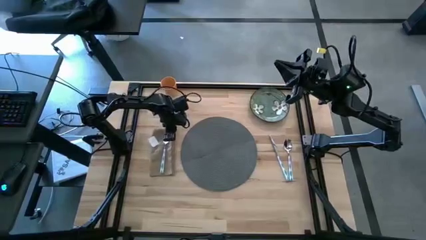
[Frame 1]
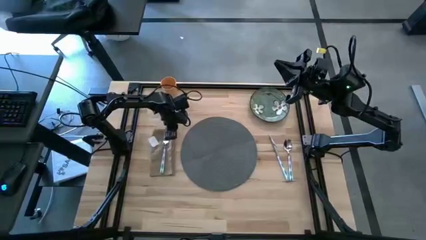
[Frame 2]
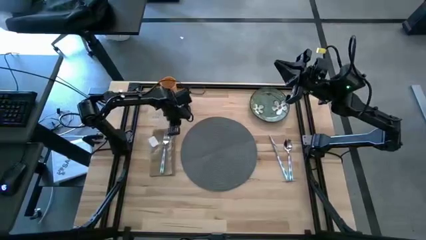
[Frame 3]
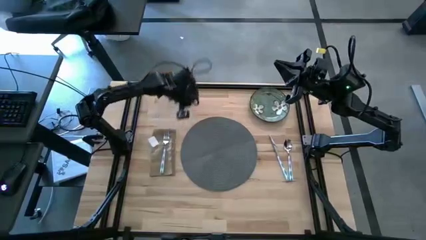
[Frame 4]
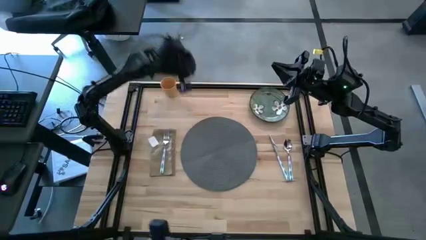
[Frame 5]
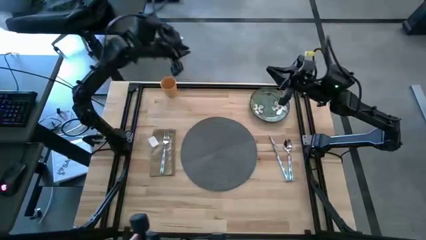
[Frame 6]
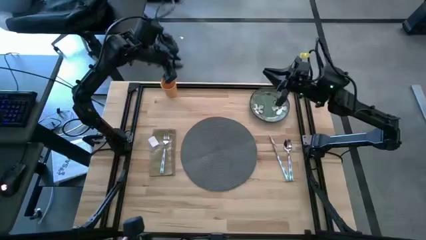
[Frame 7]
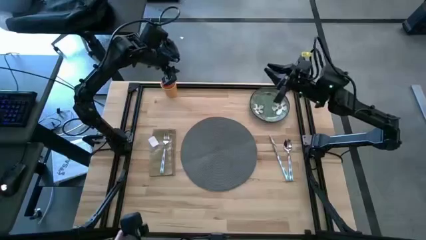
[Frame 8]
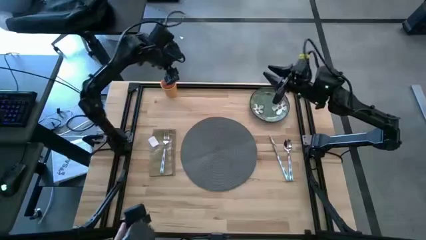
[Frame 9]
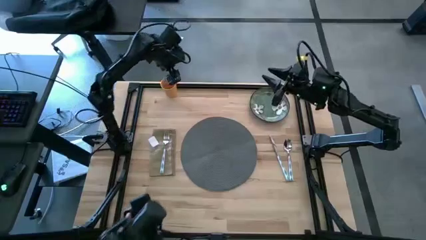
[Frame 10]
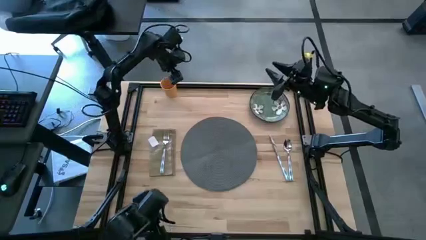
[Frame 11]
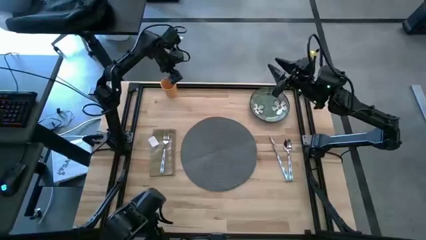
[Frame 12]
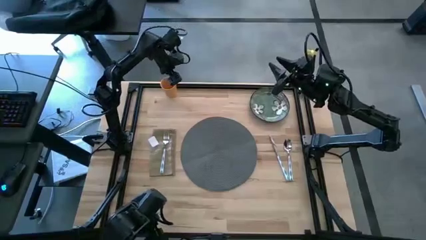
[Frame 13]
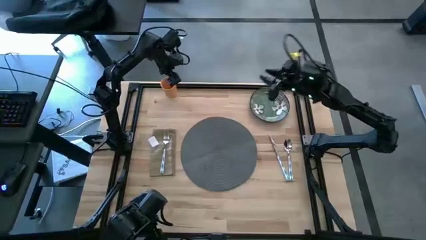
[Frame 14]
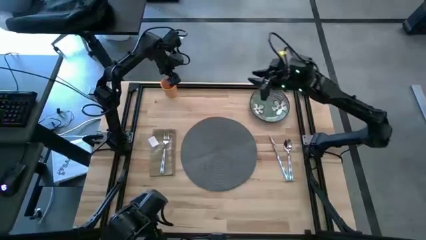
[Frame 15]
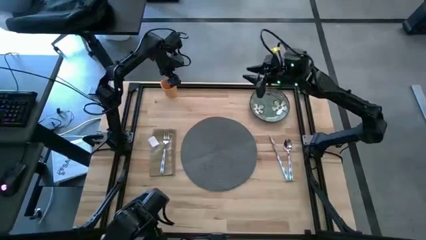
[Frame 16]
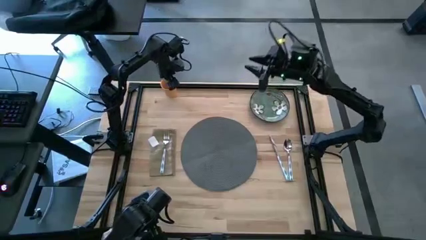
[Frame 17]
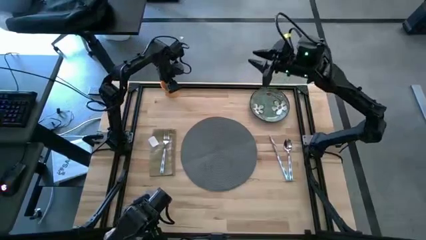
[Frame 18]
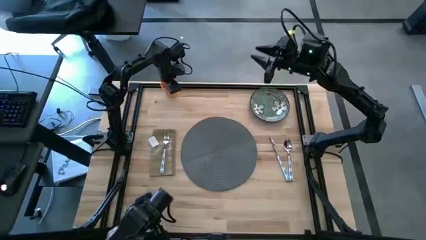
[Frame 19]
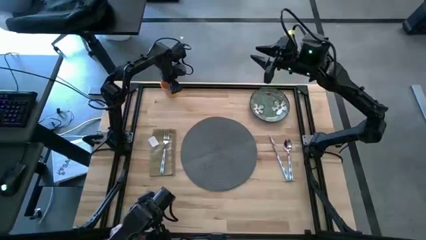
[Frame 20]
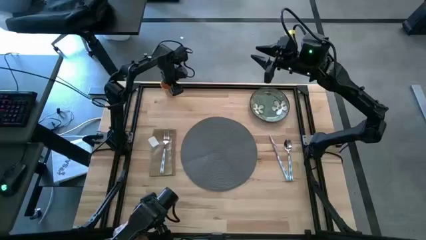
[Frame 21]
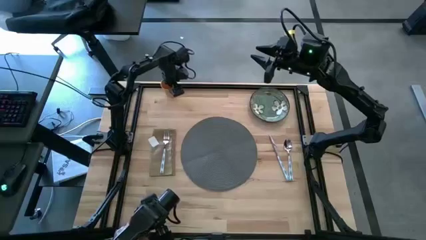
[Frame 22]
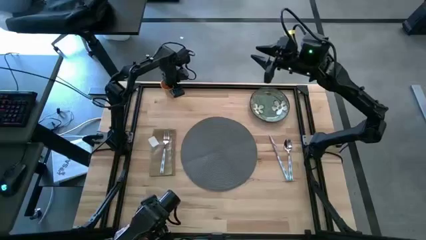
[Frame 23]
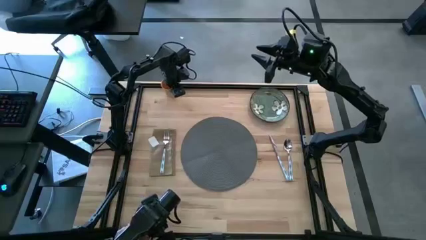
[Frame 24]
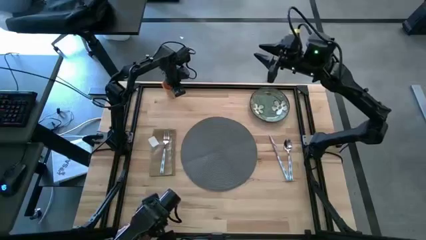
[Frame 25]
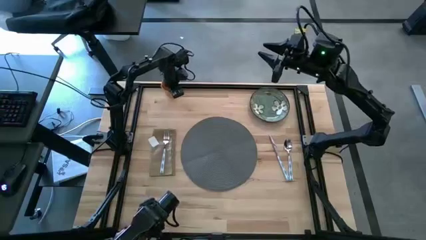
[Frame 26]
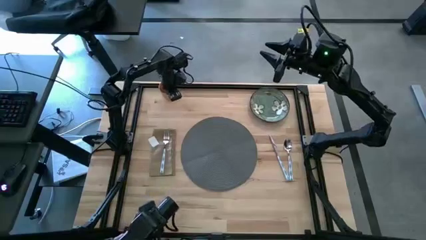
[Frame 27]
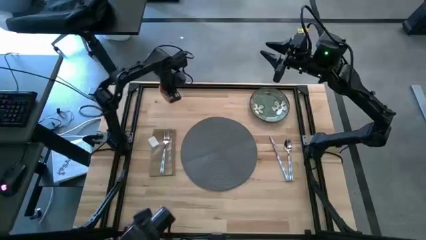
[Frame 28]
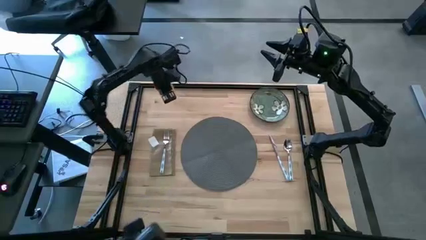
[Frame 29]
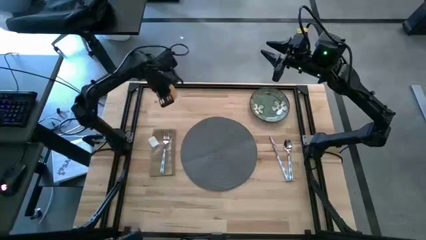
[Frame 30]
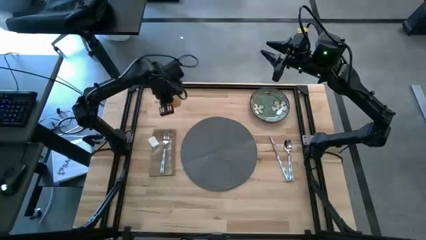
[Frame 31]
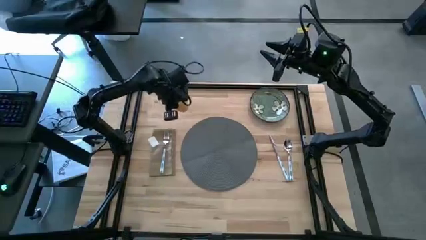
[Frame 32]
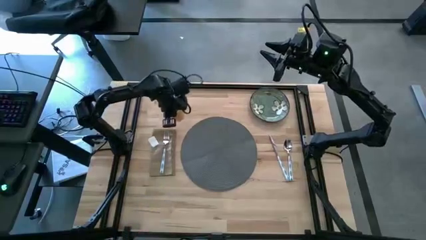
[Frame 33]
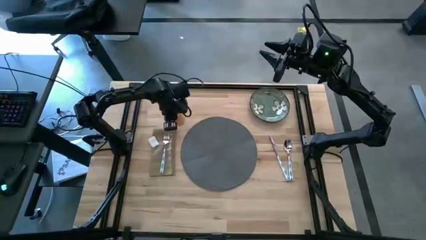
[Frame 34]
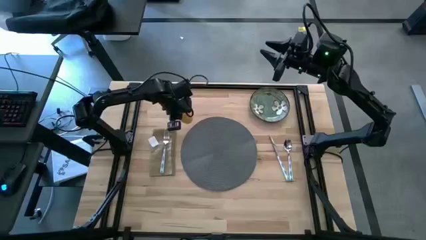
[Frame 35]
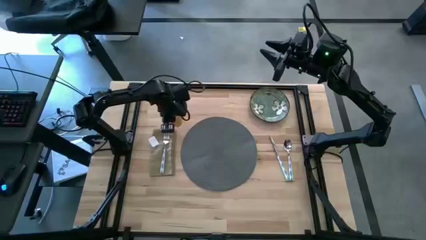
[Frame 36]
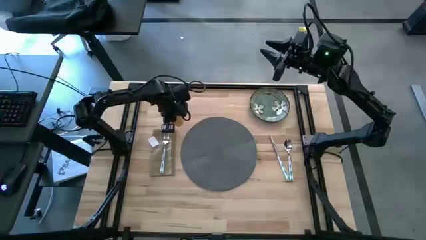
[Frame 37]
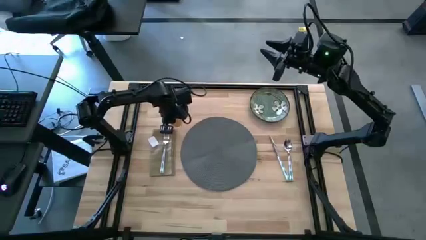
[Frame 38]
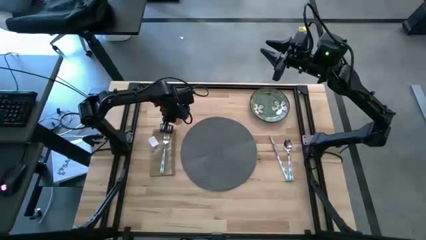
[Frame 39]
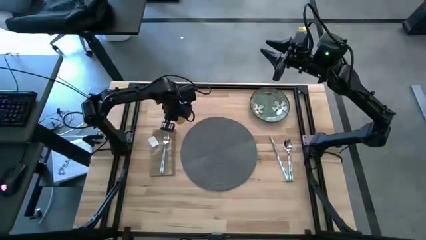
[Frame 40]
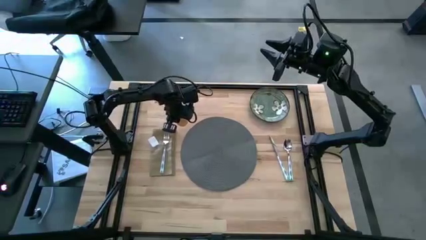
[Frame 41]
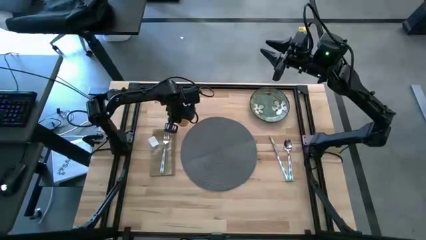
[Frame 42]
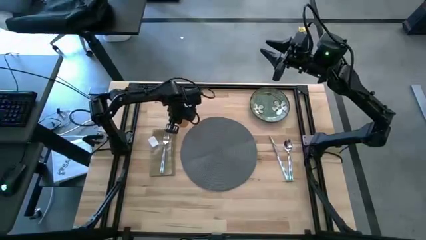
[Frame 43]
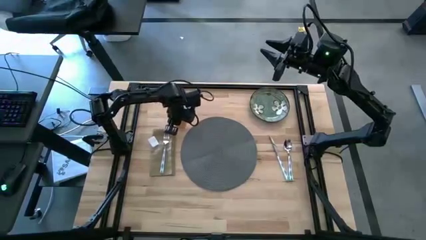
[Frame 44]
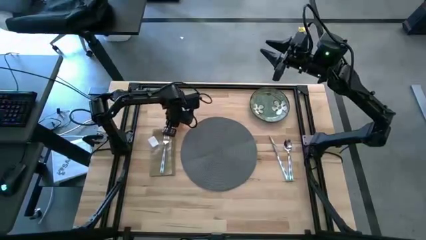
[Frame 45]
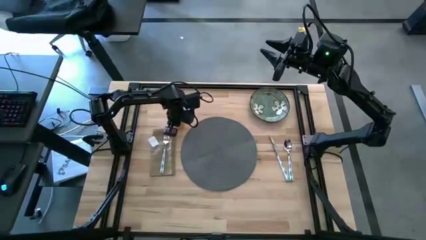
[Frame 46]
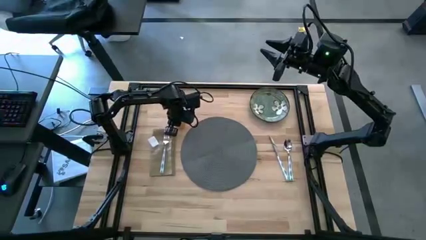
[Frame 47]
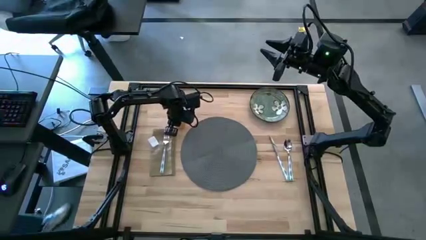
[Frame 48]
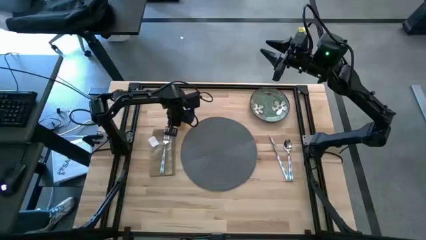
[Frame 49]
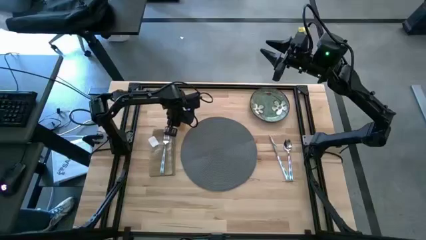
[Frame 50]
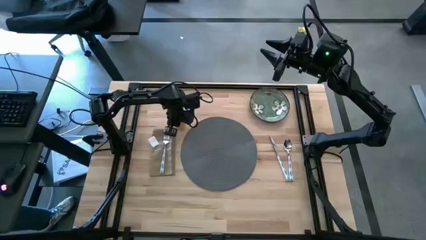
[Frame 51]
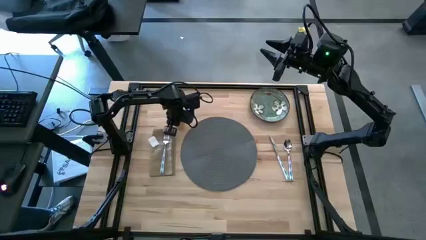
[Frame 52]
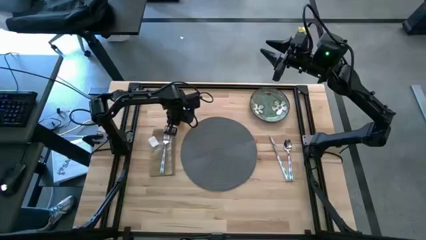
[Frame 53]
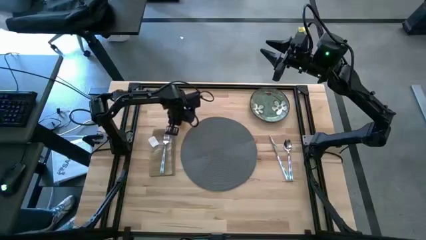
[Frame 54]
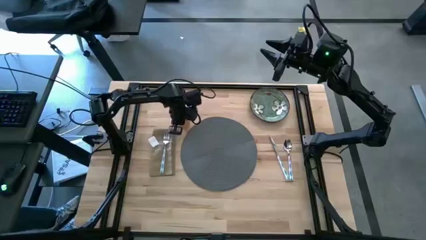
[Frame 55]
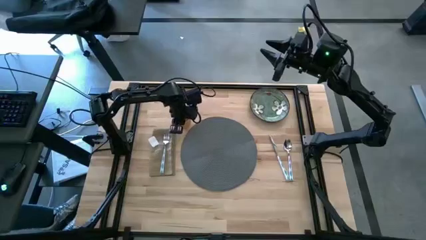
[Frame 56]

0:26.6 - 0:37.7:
Task: Set table place
Put the orange cup to the top left of the gray table mat

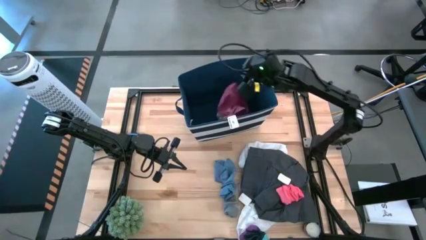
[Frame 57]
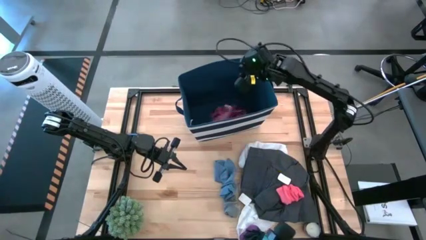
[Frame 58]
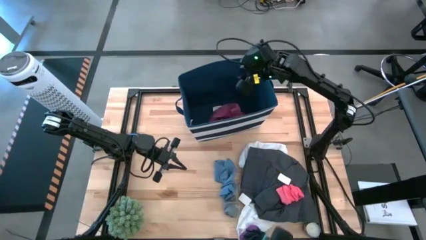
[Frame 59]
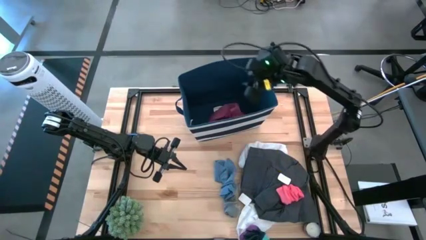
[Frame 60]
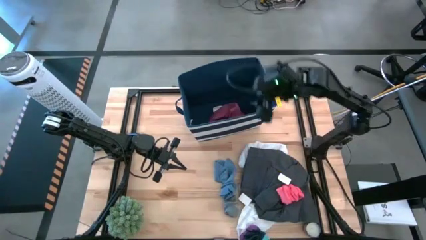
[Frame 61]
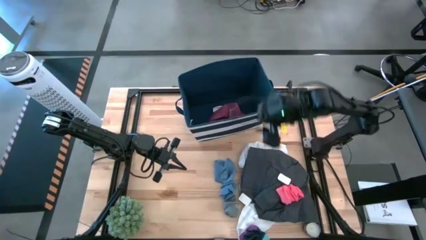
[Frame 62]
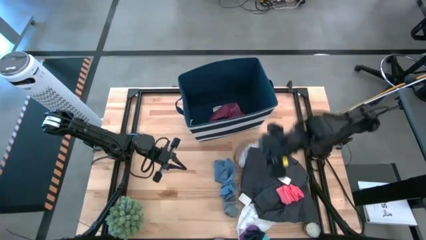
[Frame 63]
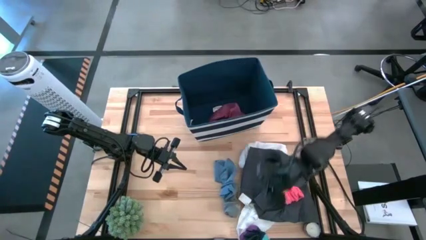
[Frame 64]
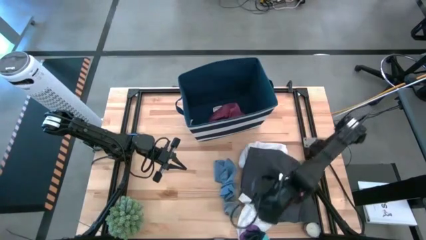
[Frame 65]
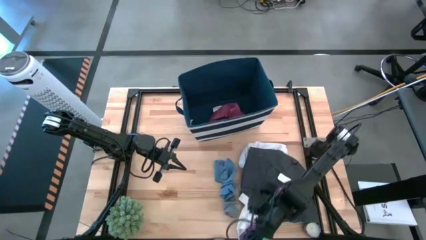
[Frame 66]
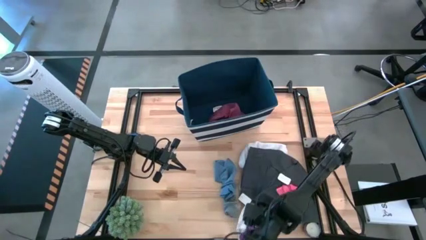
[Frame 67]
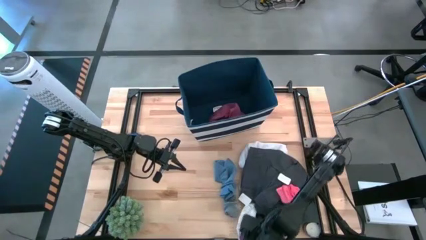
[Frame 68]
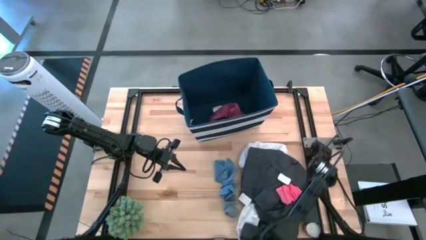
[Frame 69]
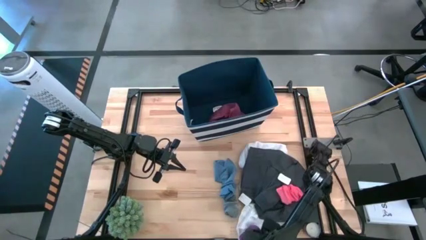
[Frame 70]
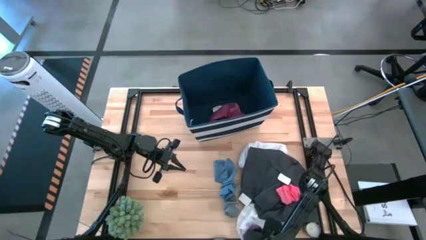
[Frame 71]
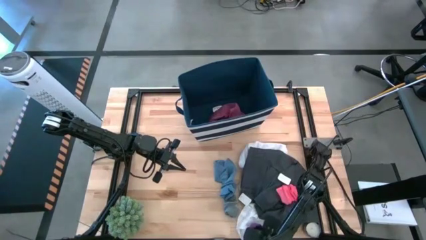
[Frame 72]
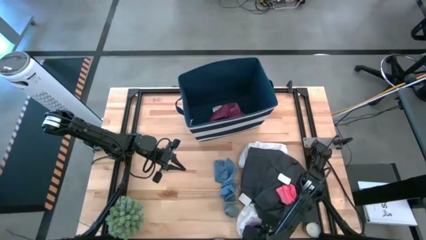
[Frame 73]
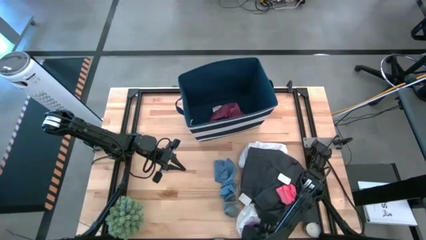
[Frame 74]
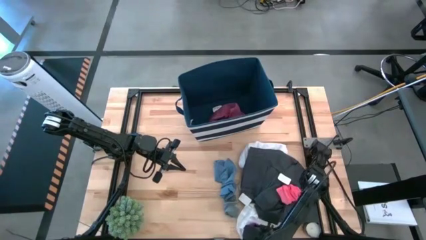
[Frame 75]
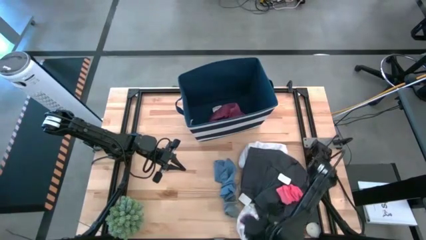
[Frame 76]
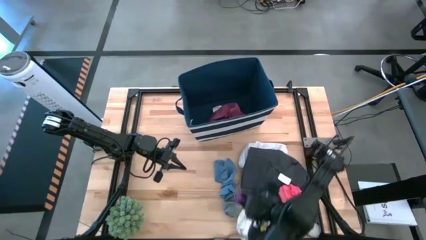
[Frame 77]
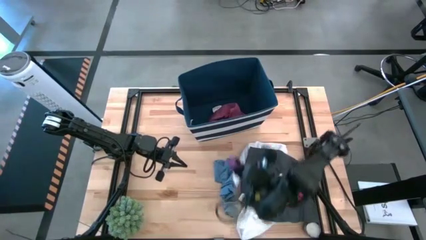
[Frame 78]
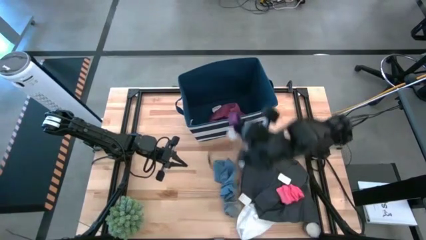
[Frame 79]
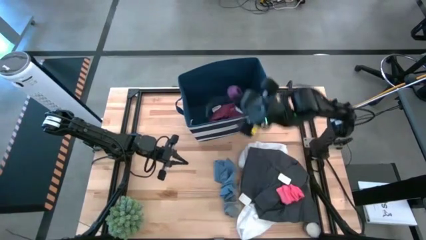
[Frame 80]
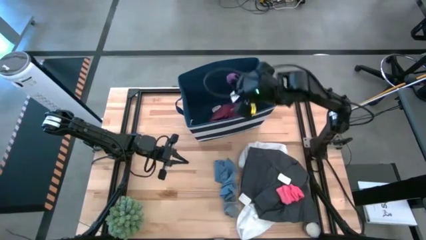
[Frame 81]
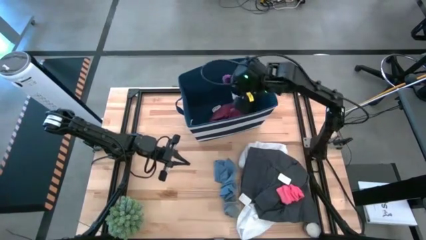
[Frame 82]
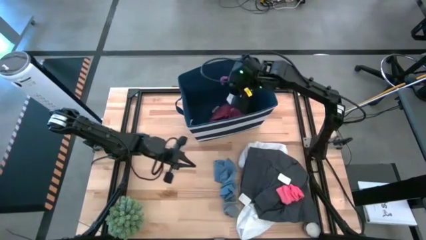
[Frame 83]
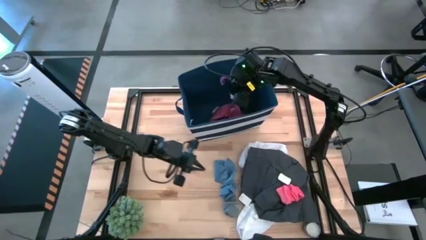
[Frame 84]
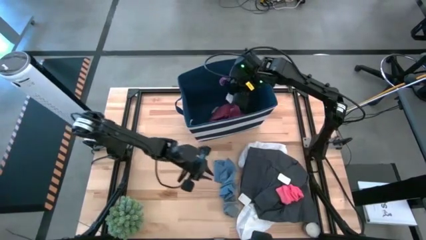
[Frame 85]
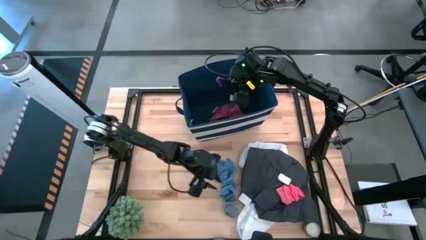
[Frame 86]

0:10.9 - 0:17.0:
Task: Sort clothes
Put the dark blue socks into the laundry bin
